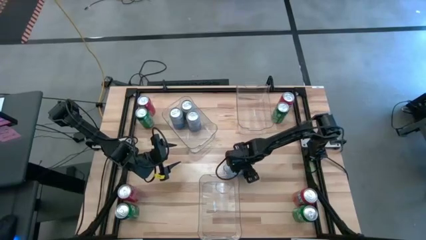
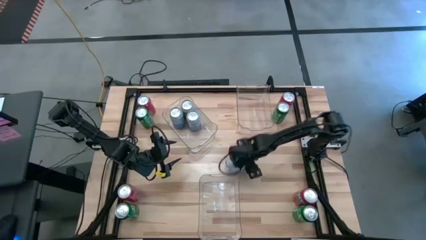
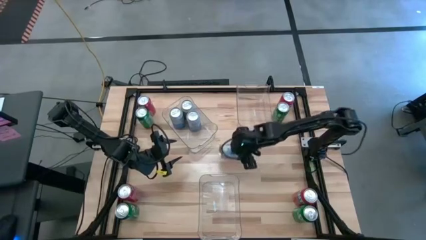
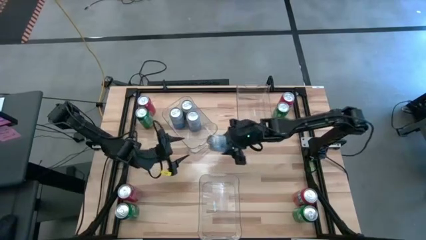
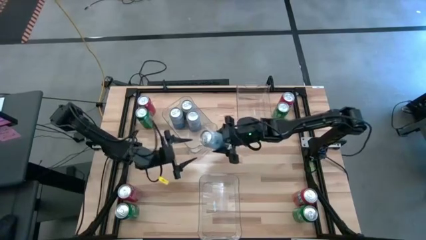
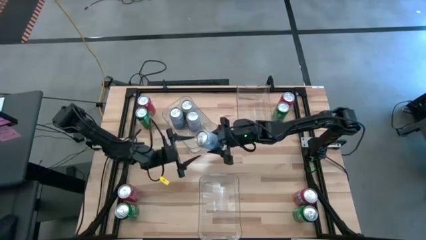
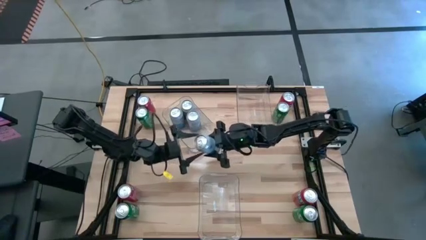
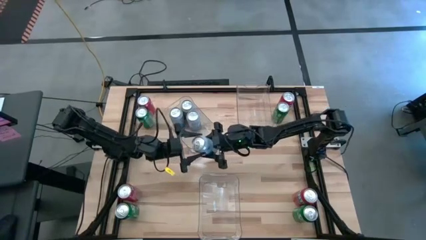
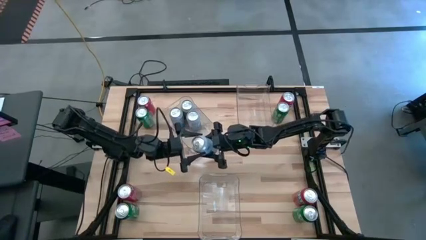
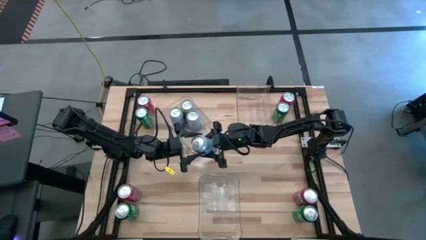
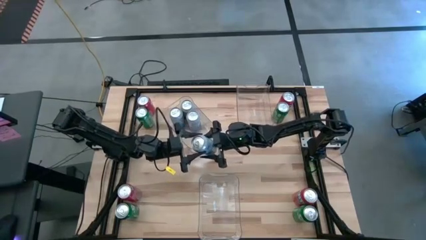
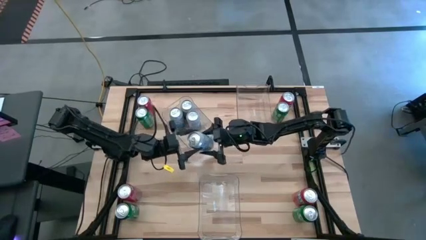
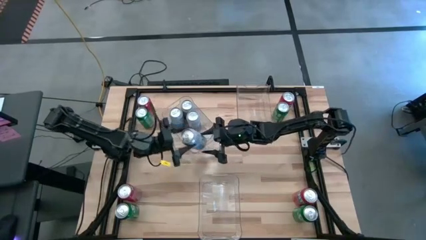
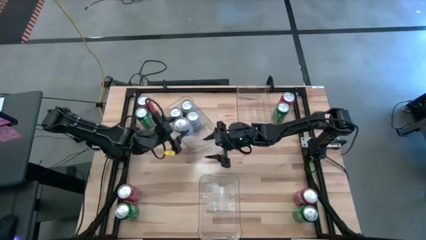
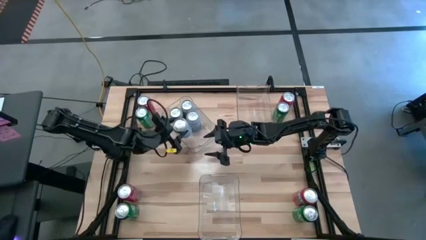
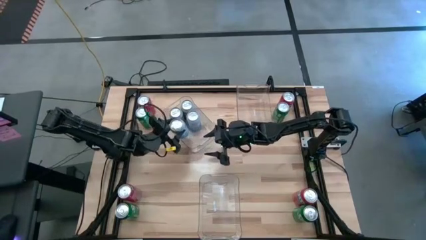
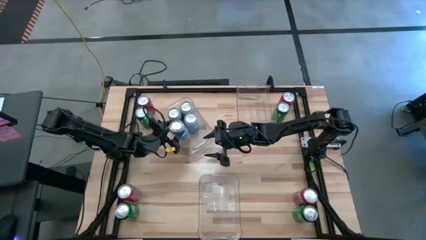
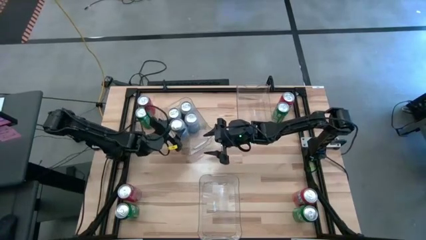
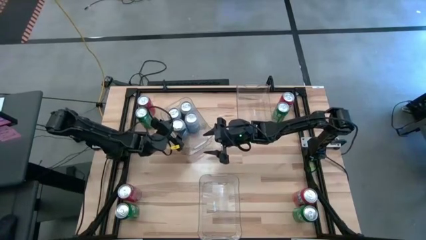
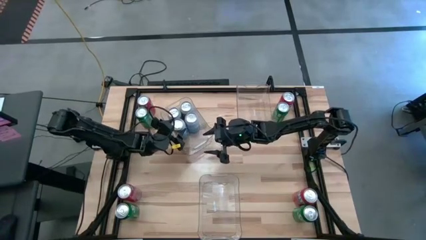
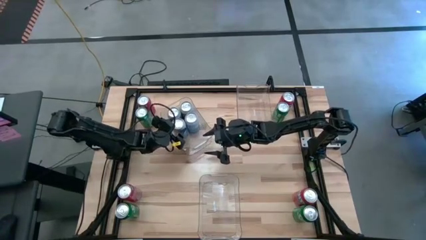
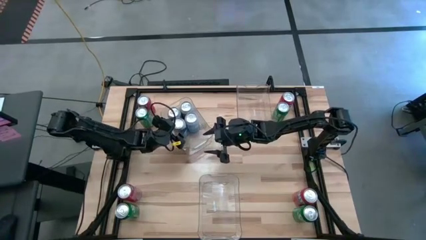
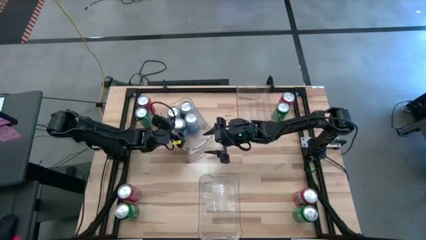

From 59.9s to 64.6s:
Task: Sort soda cans
Put the blue-white soda can into the top left transparent bin

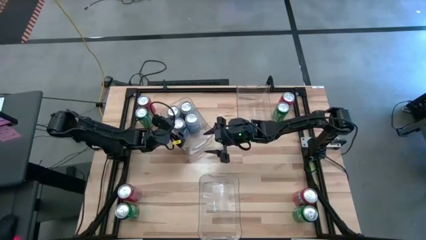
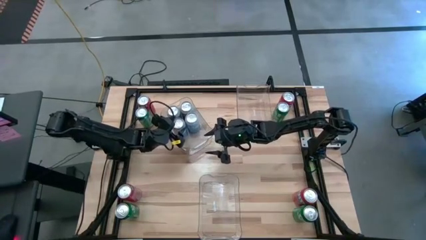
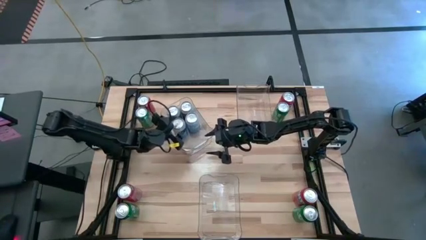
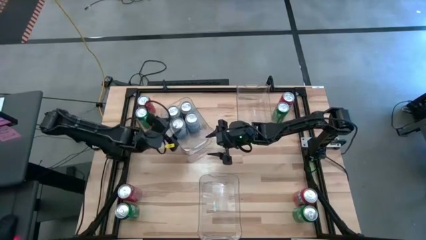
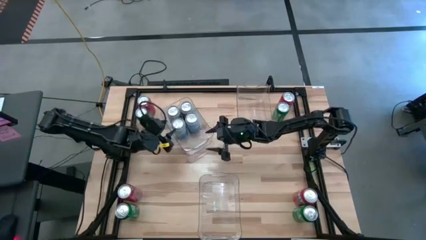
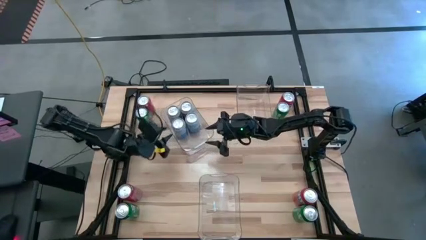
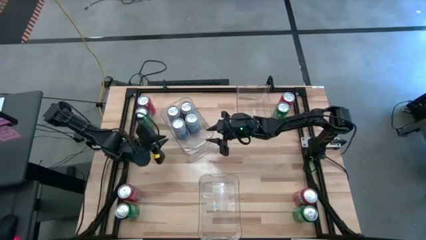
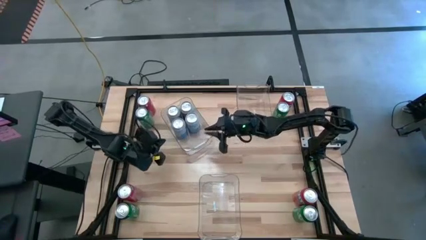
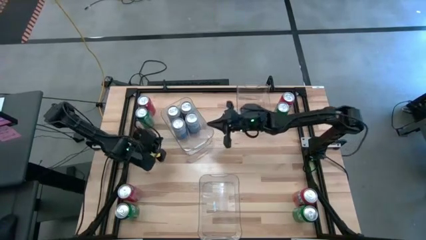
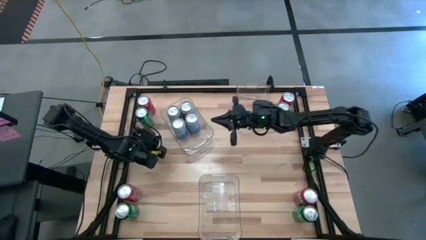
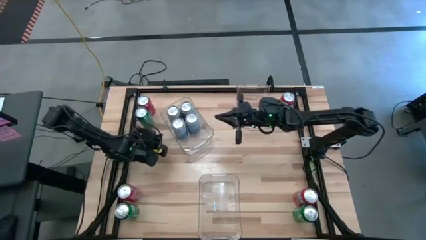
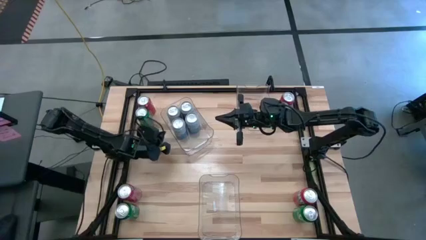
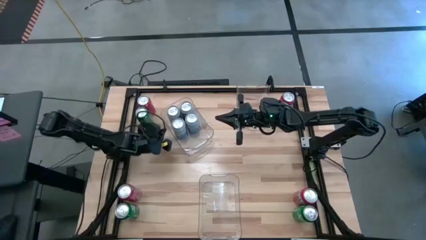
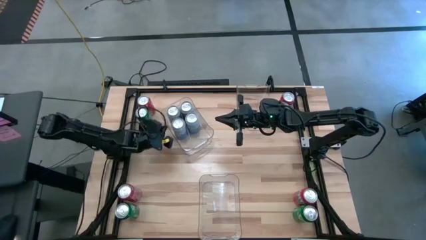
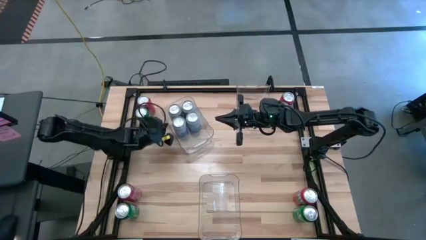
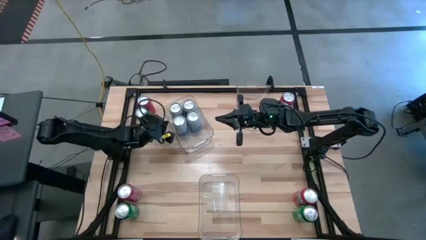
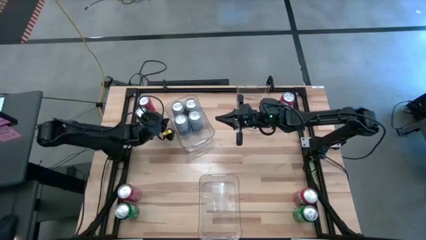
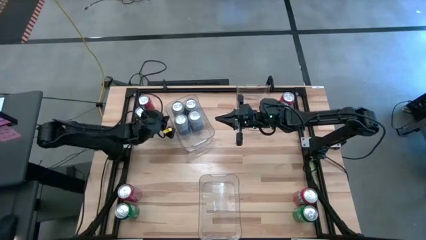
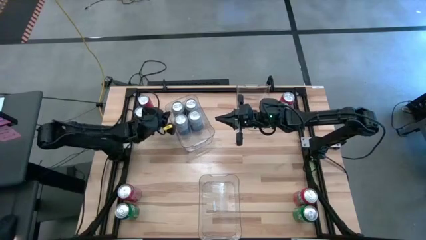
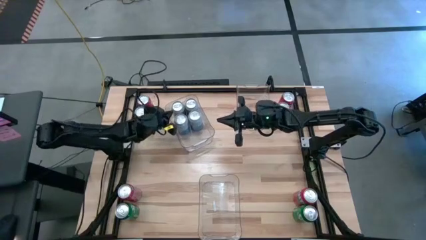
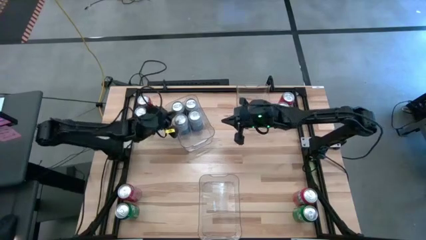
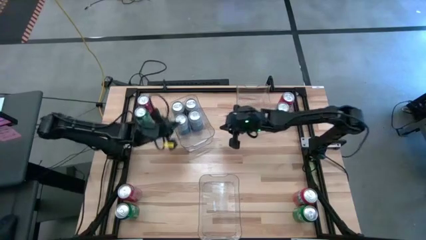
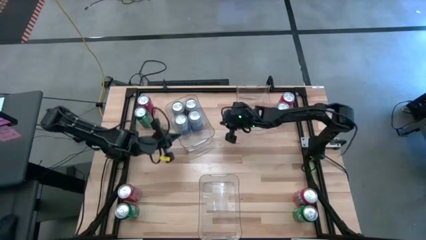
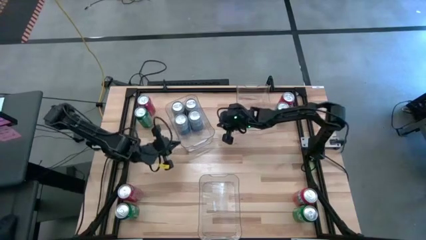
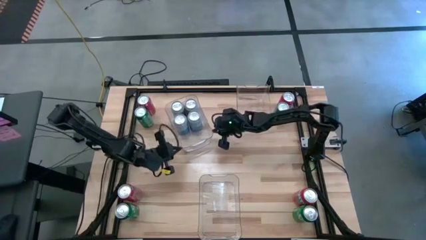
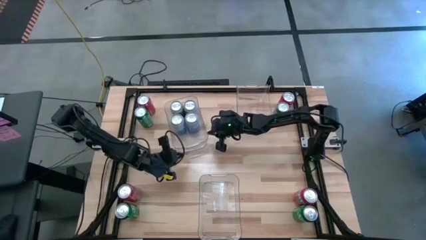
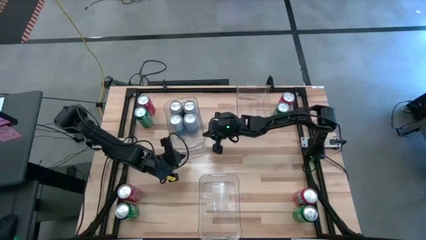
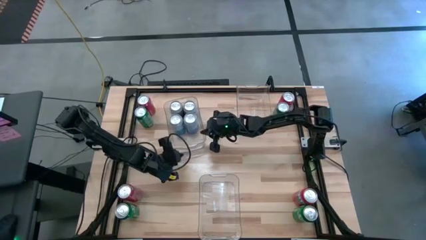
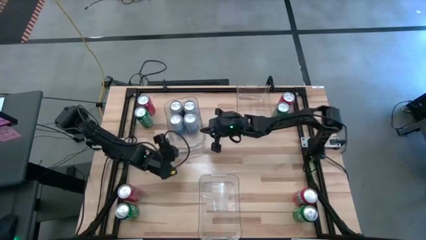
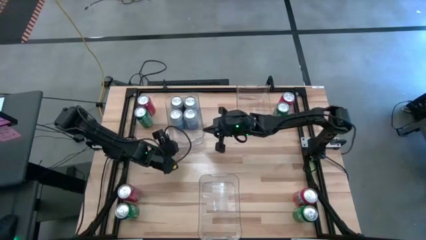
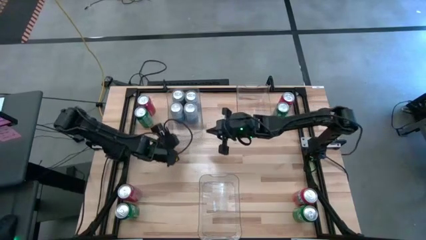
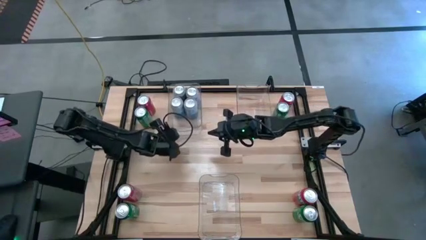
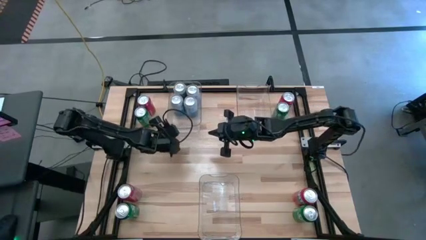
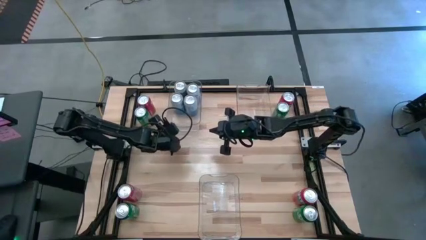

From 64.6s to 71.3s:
Adjust the top left transparent bin on the table
